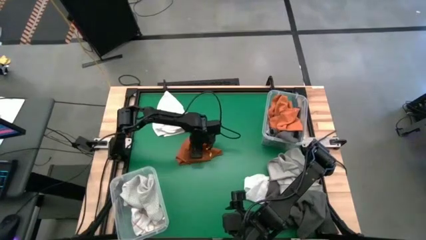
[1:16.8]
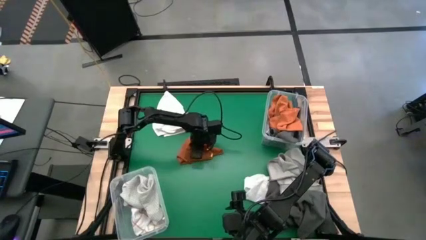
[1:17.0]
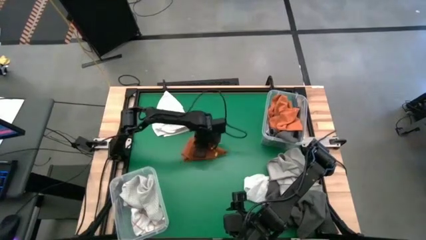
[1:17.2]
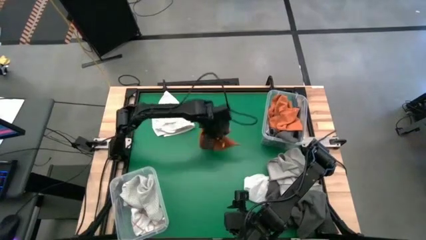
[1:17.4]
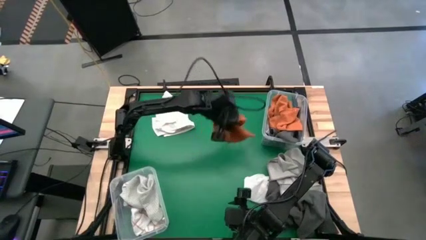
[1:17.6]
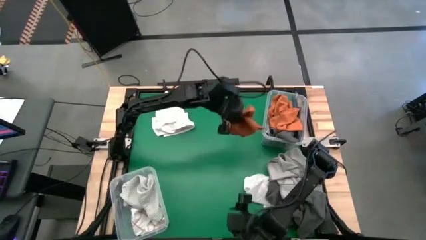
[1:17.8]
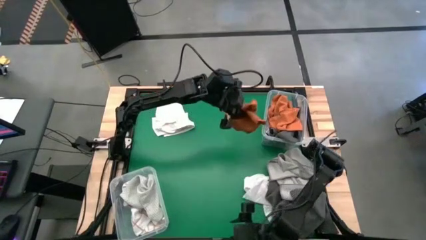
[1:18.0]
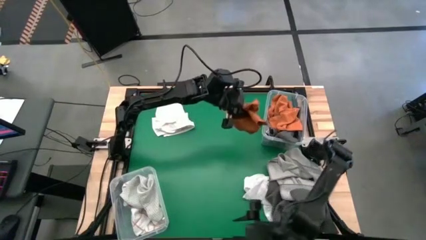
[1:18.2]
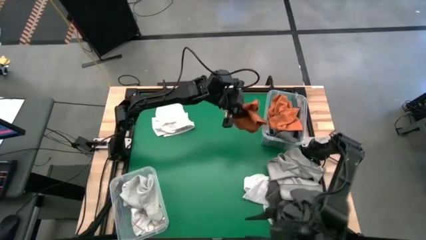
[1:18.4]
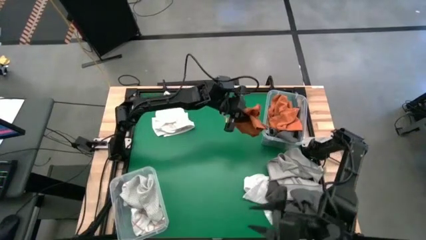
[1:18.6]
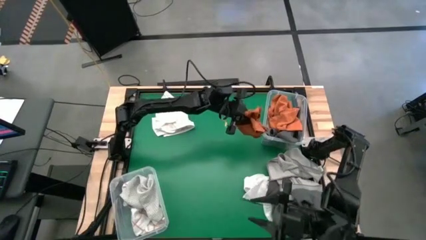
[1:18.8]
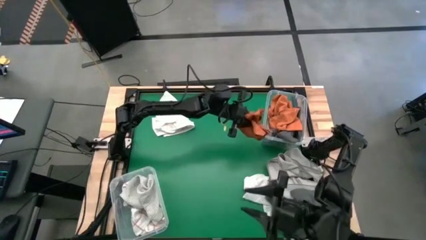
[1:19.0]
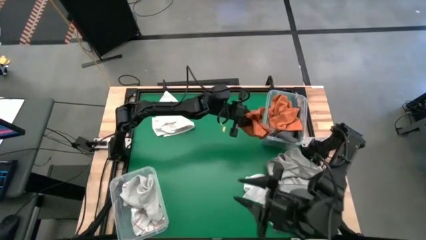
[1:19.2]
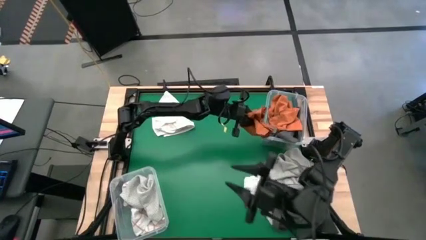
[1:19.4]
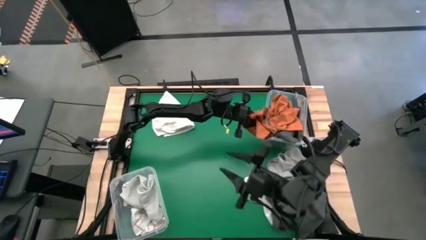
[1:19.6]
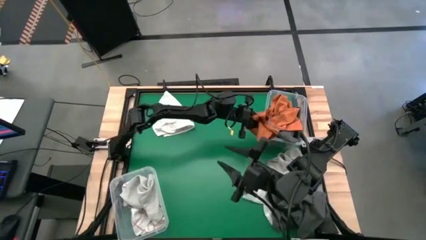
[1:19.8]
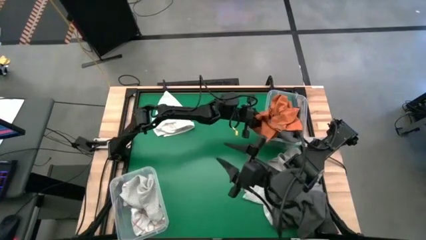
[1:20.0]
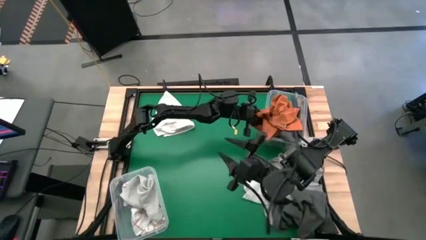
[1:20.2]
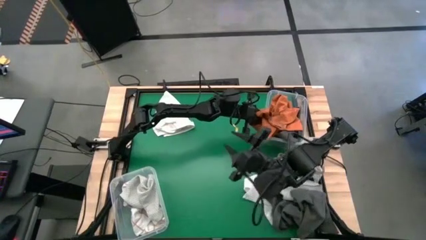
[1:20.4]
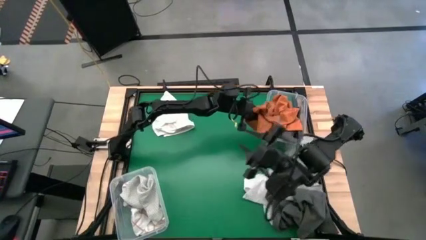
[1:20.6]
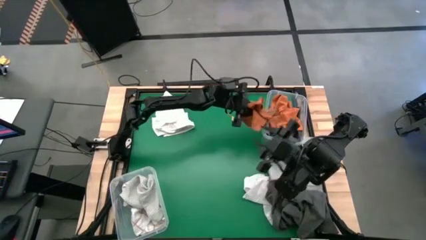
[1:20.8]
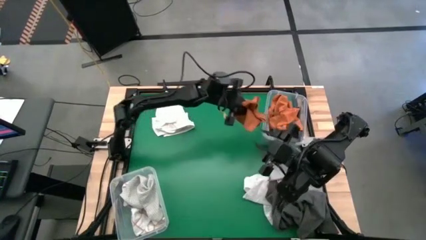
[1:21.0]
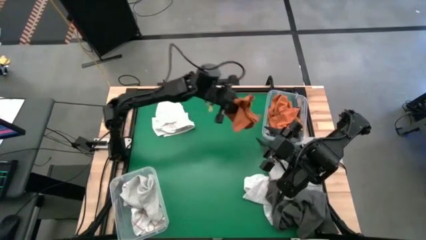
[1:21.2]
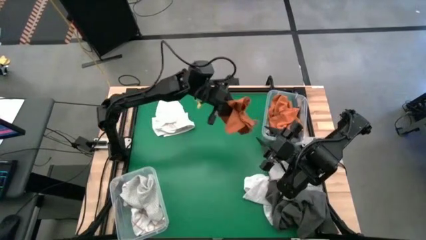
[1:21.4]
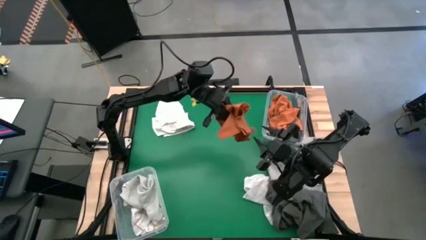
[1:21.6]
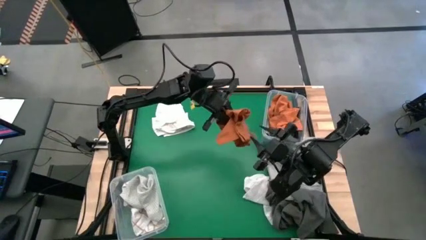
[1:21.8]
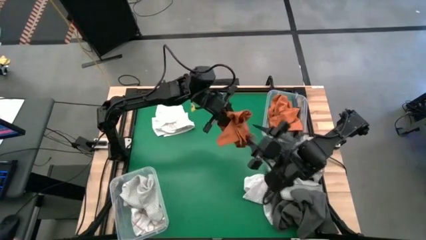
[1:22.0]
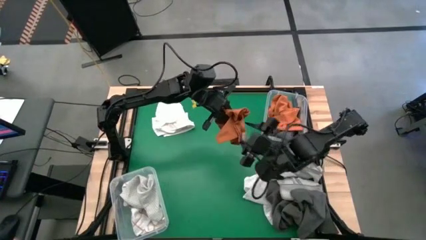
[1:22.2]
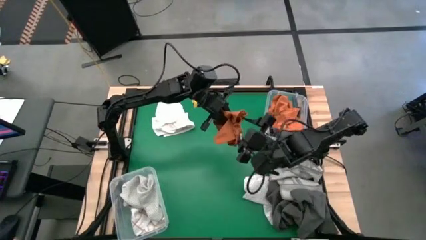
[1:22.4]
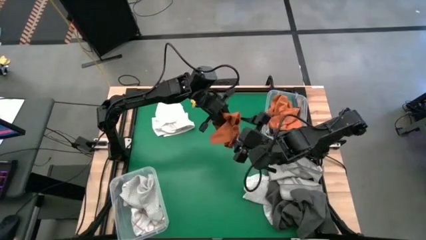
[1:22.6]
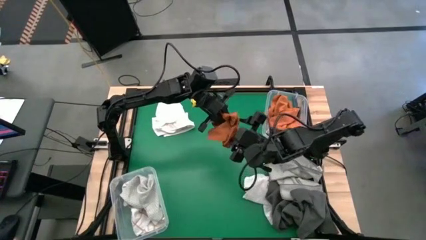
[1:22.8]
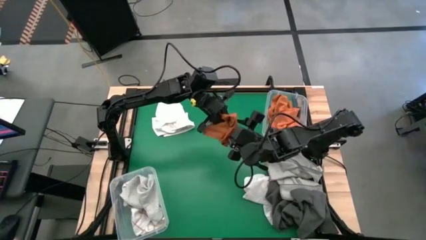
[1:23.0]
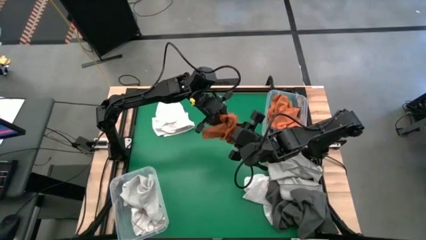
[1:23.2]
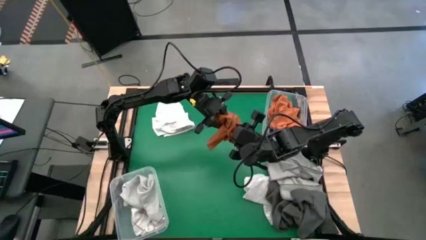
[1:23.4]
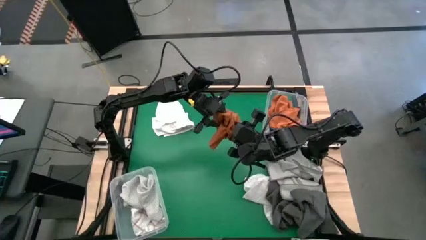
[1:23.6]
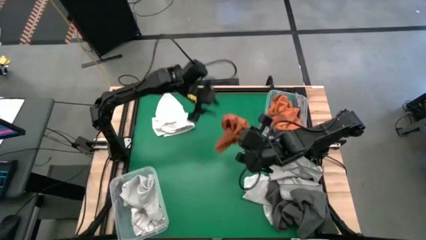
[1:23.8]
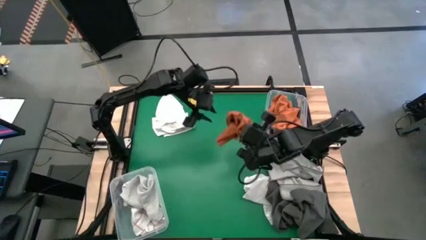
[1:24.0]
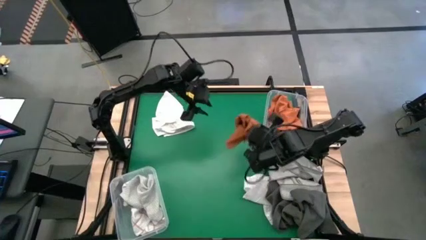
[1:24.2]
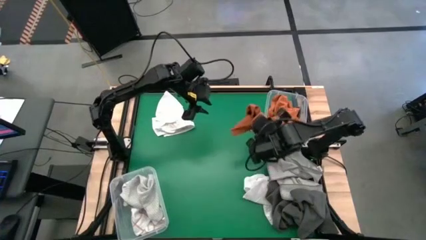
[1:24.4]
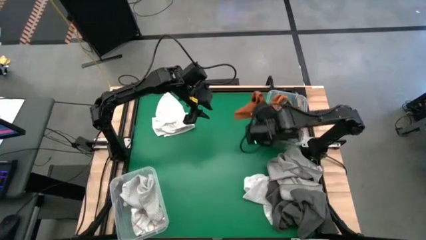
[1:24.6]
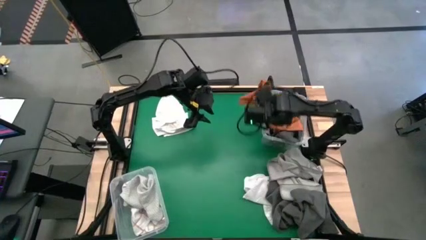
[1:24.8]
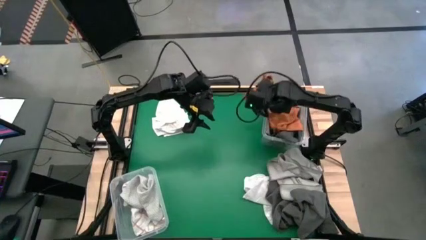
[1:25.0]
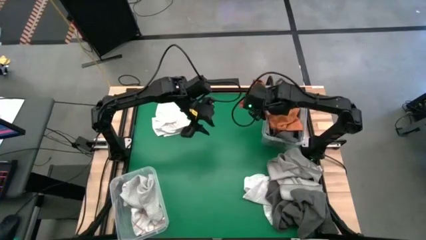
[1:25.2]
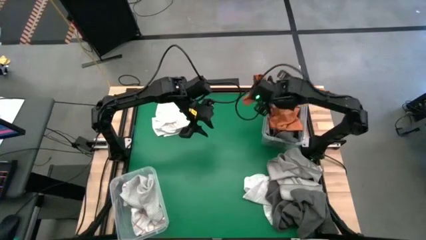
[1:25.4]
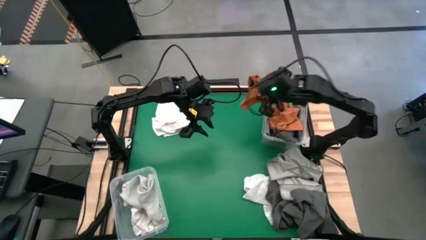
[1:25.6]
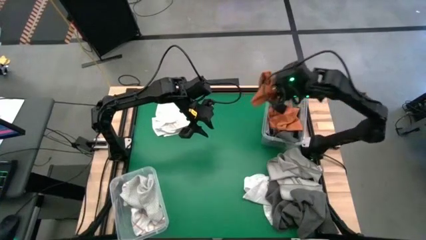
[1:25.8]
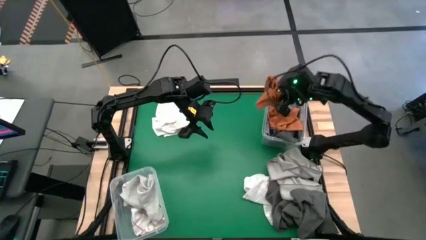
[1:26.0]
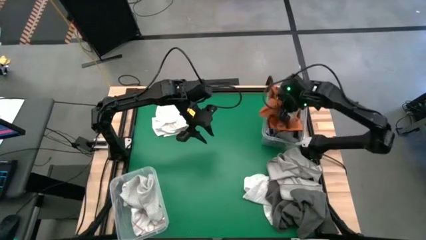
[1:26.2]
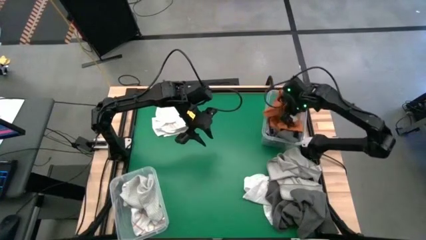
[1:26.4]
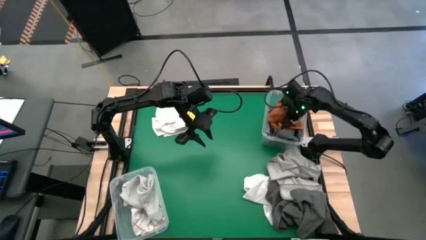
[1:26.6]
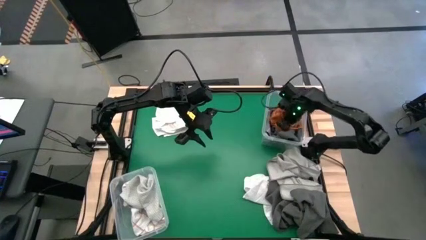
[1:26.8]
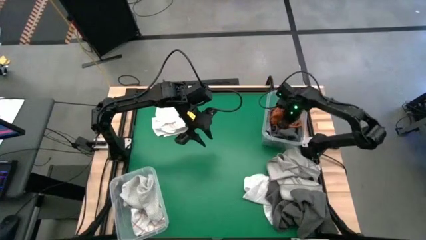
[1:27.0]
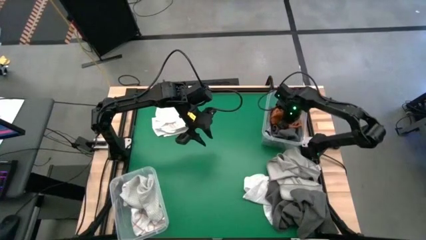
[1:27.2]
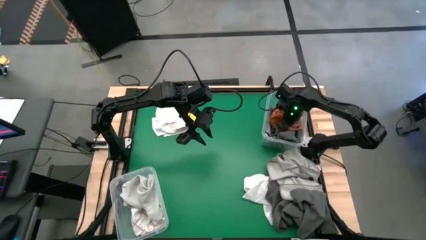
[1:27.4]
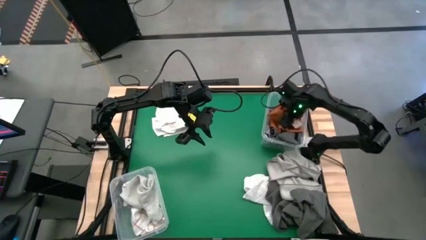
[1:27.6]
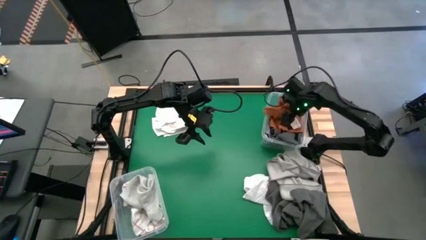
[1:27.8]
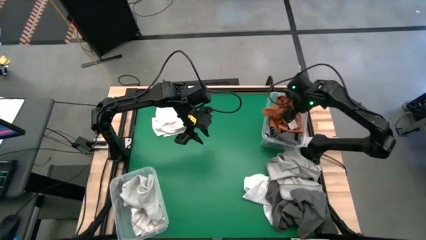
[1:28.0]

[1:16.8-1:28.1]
Task: Sort towels by color in basket
Put the orange microfiber towel into the top transparent bin
